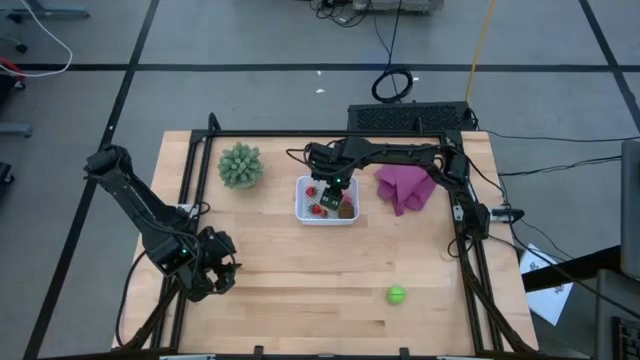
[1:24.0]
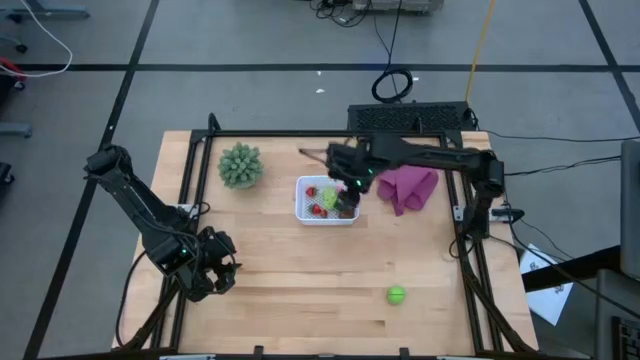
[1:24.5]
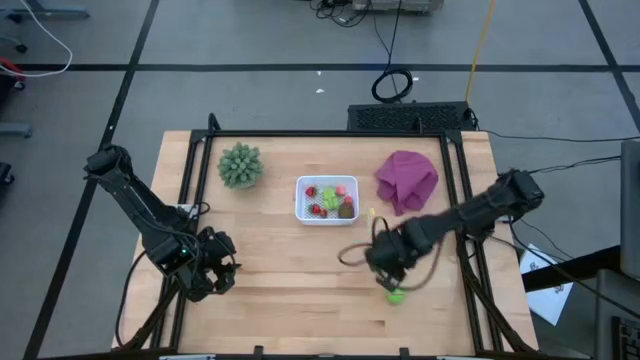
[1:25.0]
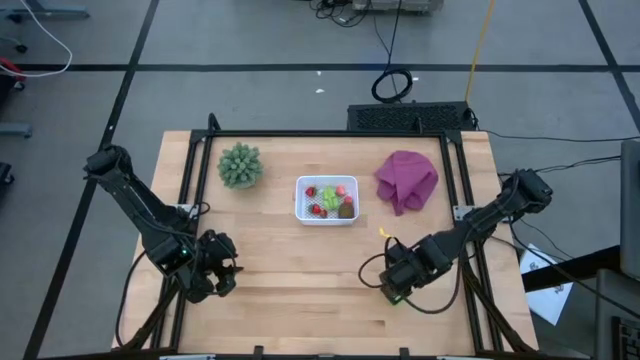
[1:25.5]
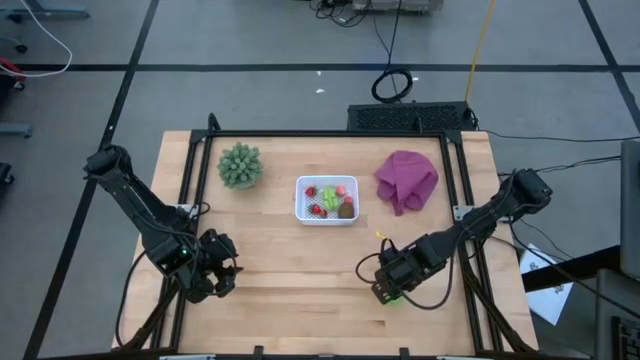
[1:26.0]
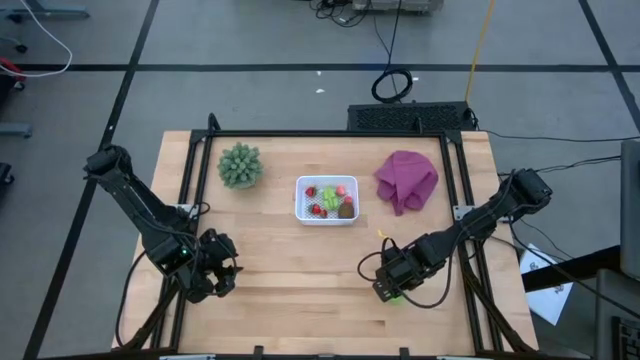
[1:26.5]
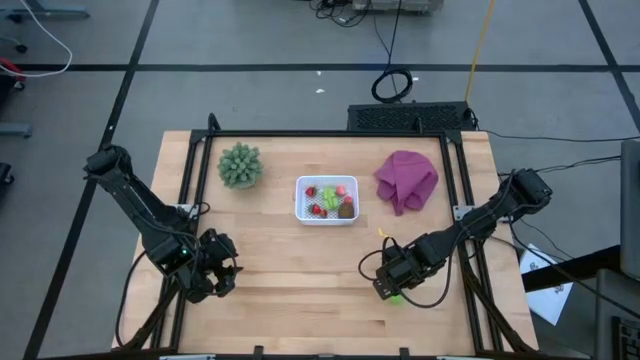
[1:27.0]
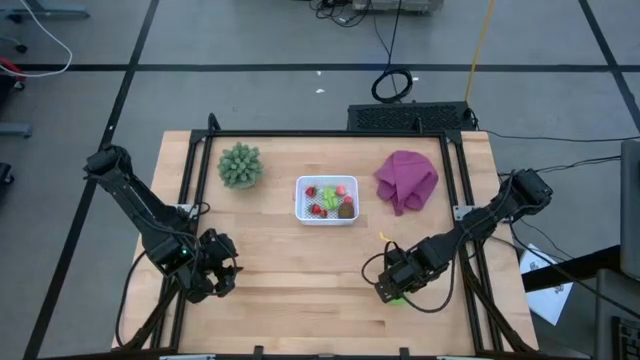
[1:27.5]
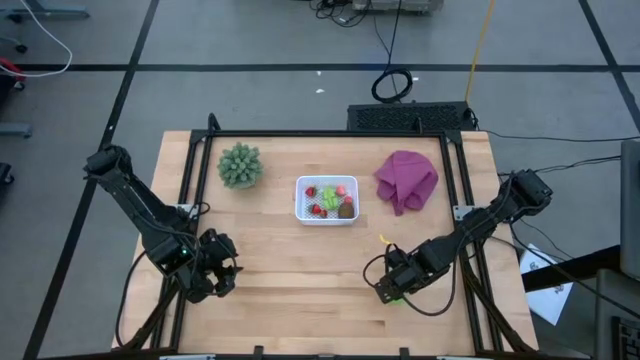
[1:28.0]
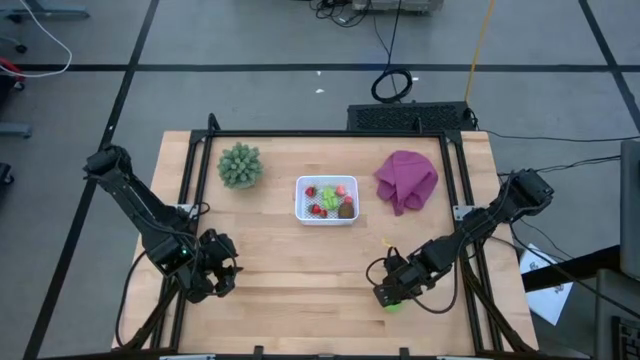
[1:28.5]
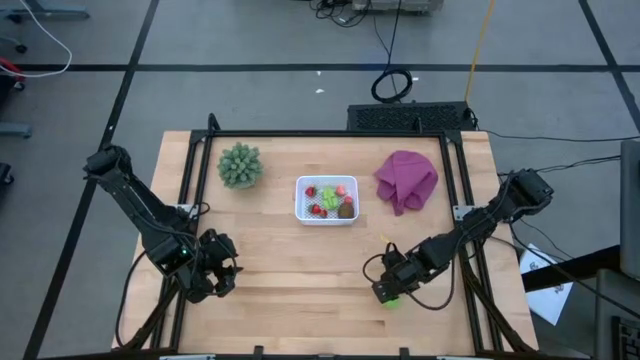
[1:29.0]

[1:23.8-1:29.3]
Task: Pick and placing Produce into tupperware
Put the green cabbage into the white bin

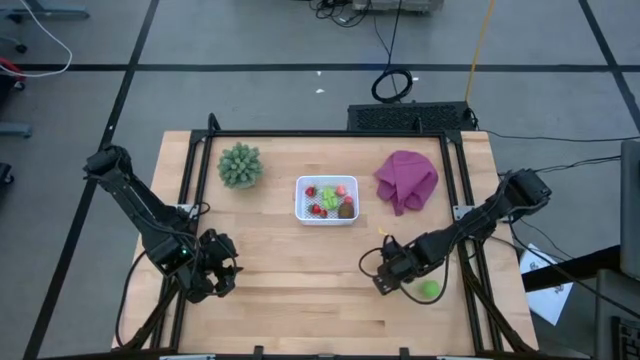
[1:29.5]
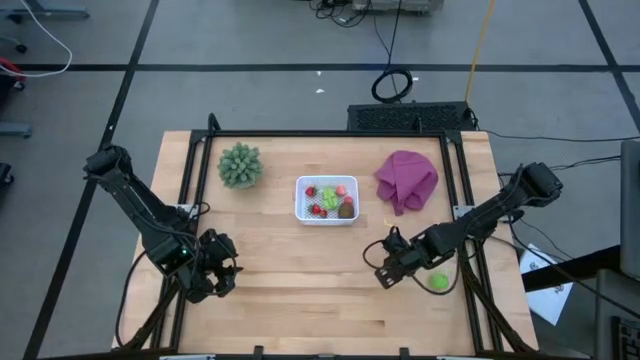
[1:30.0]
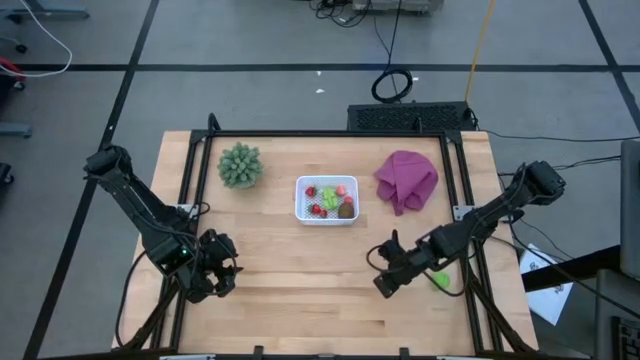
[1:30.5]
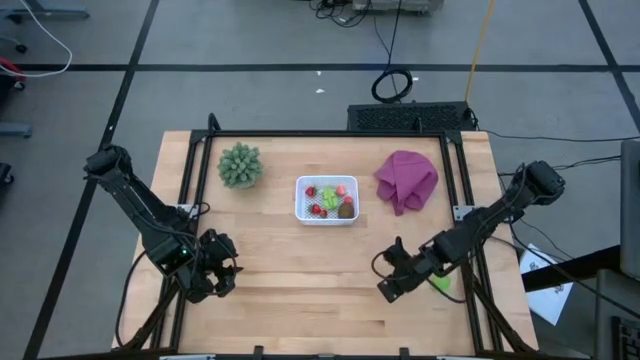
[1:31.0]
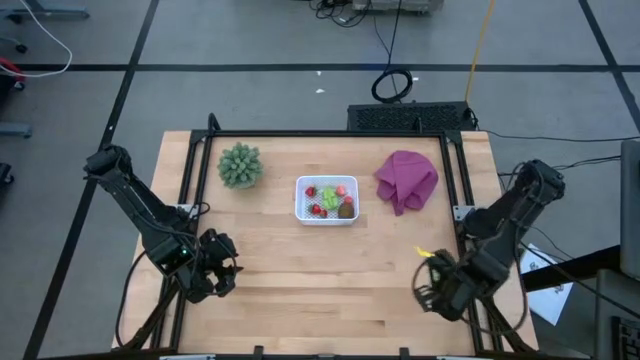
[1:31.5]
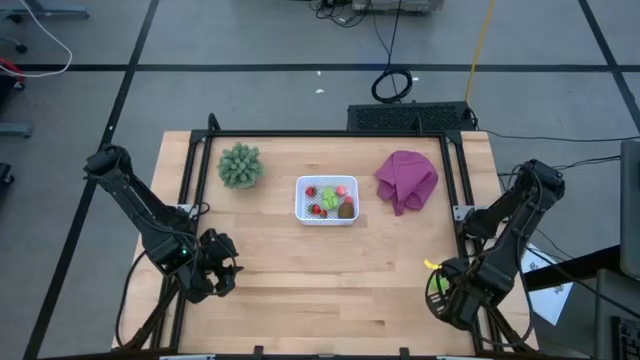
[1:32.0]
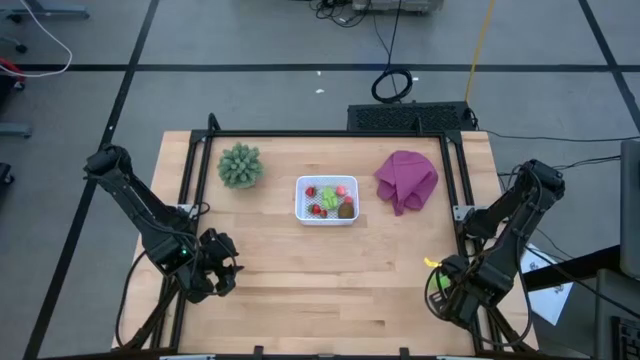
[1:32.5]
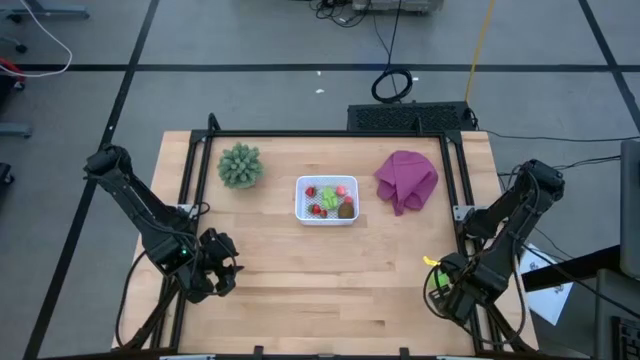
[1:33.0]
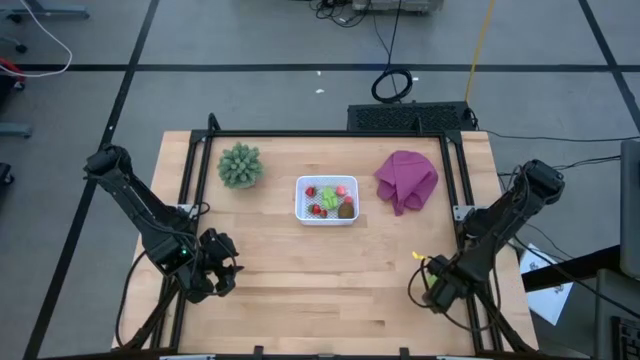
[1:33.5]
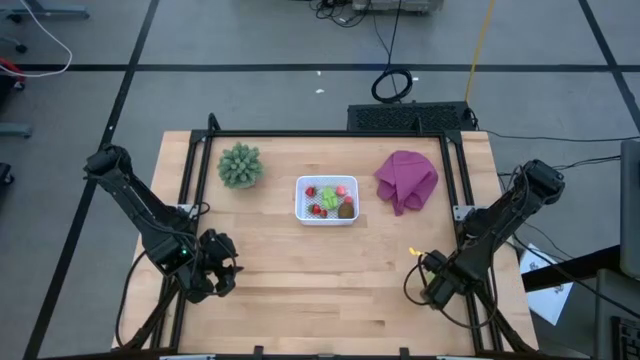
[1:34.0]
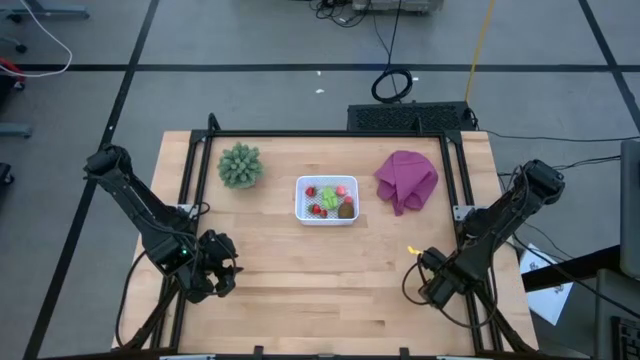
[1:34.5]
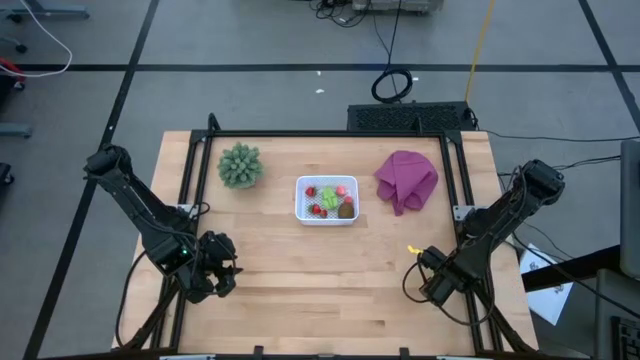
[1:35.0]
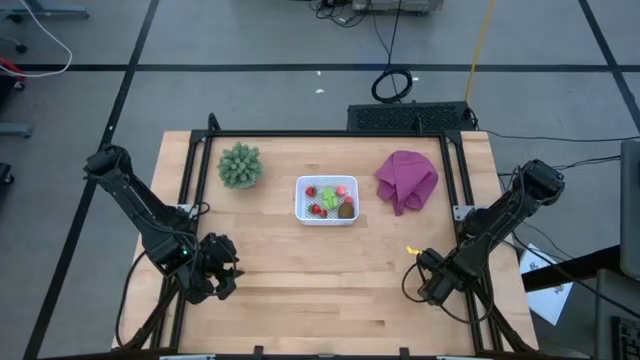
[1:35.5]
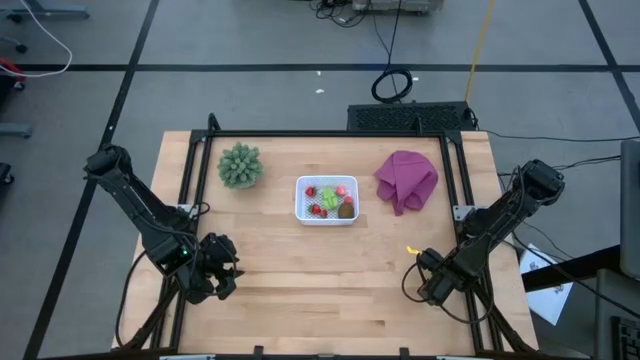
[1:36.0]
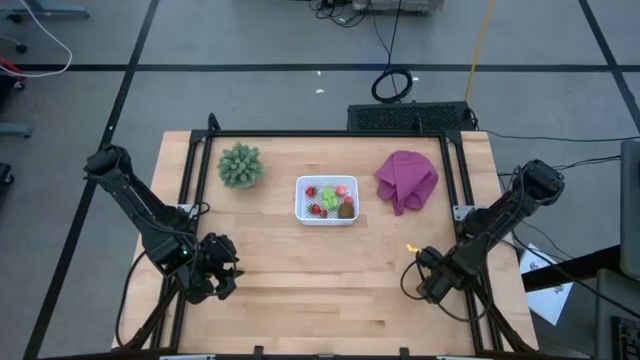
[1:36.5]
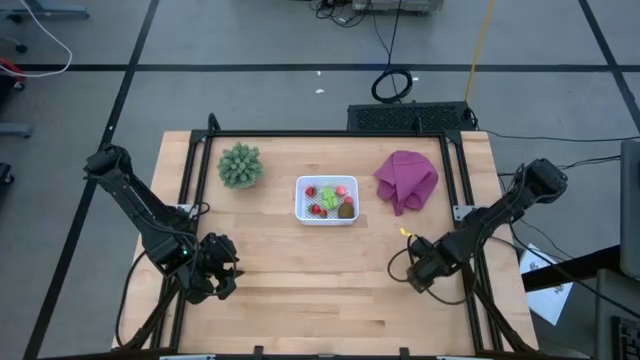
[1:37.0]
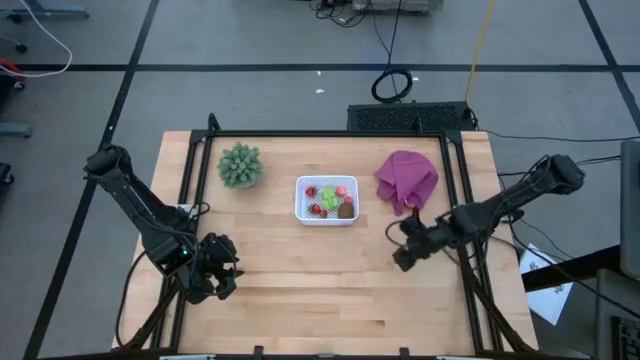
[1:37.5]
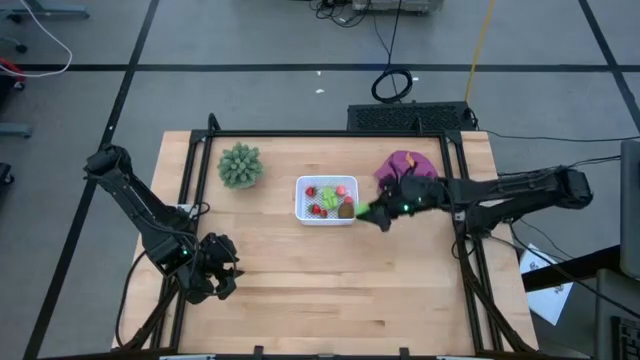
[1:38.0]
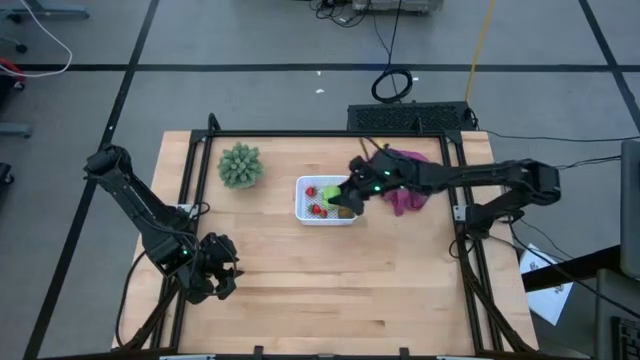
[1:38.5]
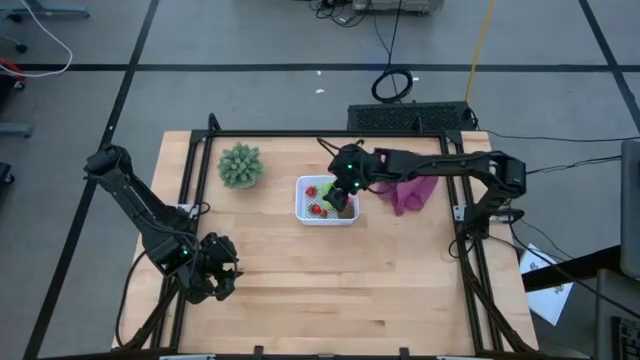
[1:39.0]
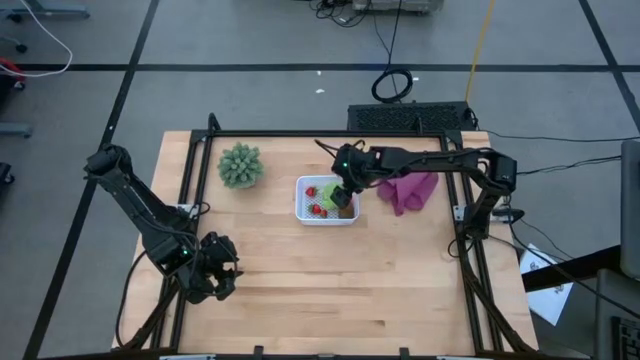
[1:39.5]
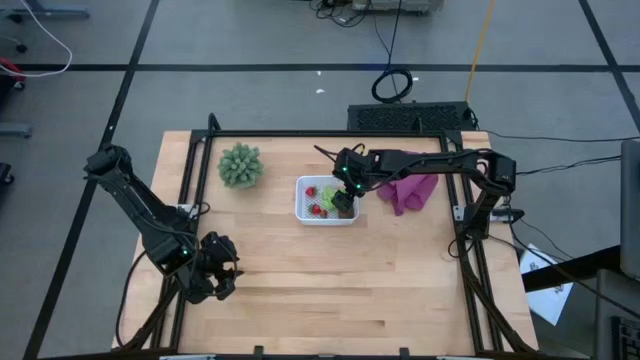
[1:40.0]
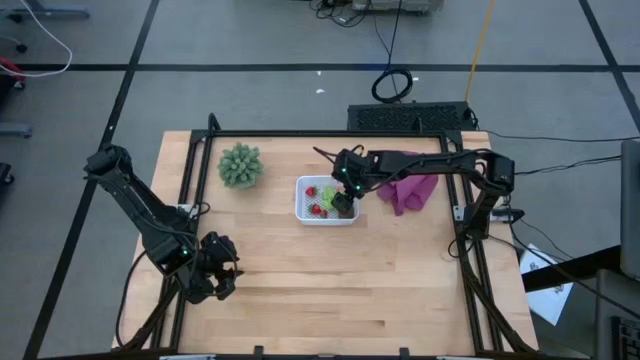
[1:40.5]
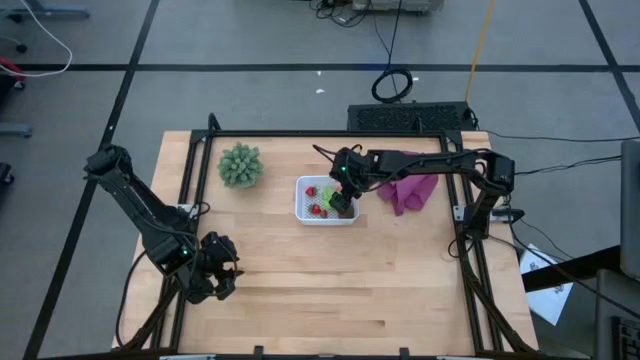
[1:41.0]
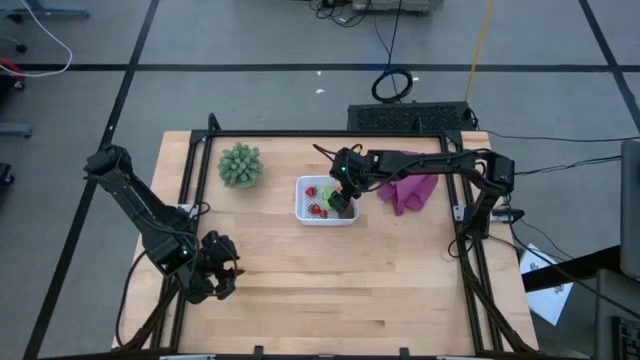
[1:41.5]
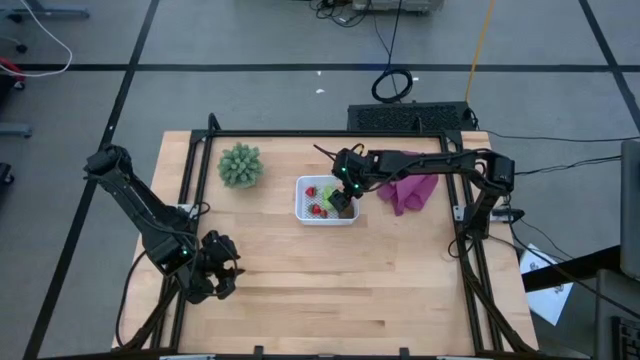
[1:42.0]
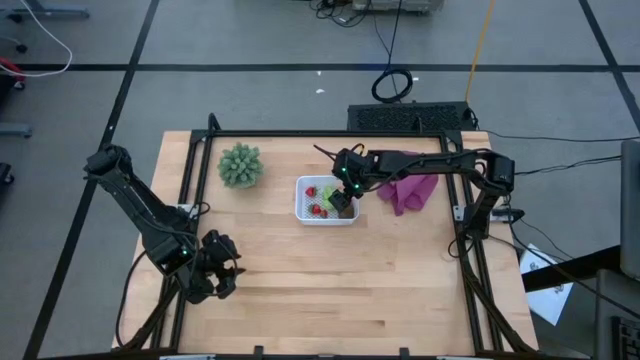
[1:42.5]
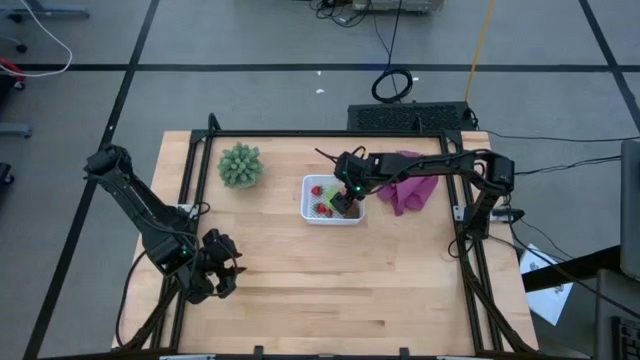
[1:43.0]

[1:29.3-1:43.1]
Put the green cabbage into the white bin

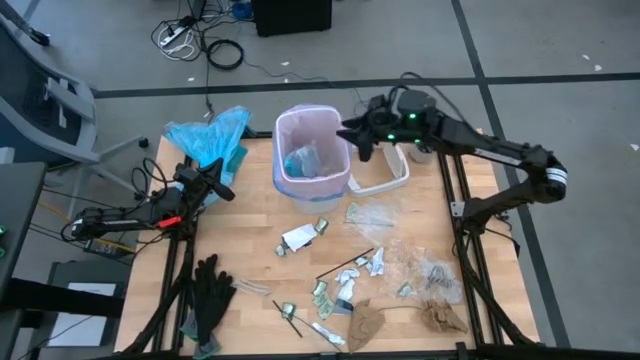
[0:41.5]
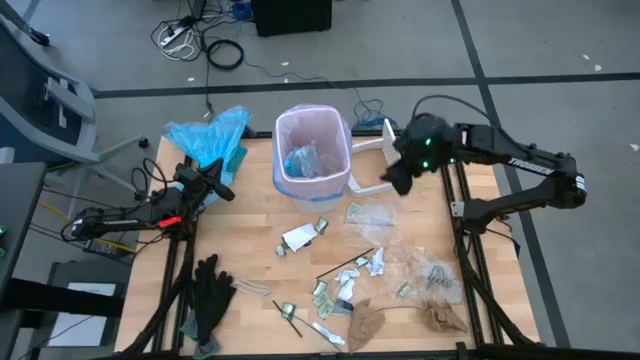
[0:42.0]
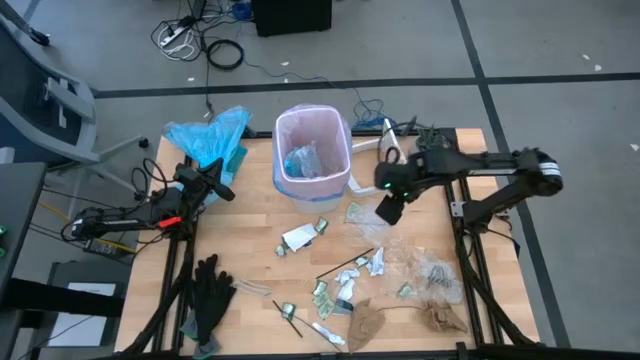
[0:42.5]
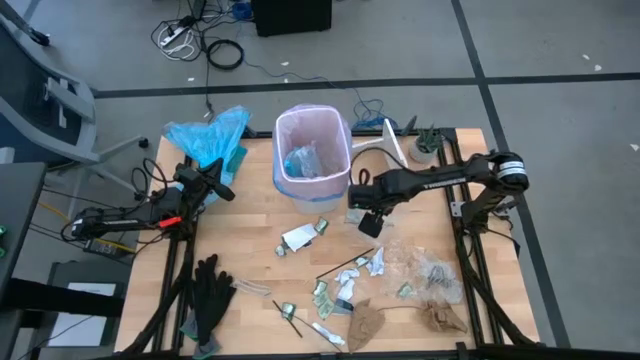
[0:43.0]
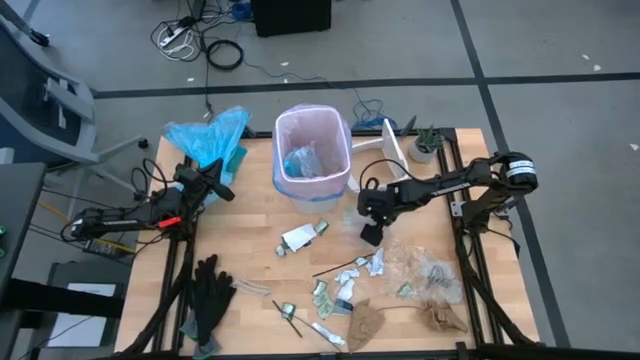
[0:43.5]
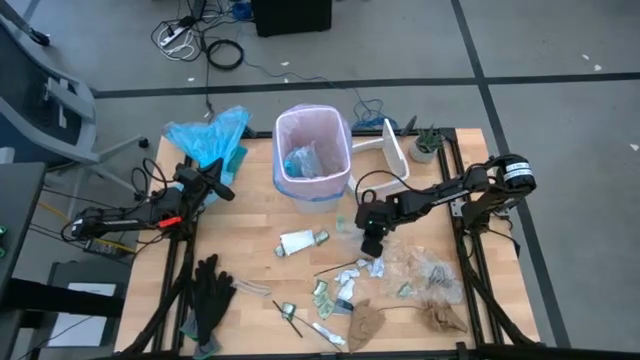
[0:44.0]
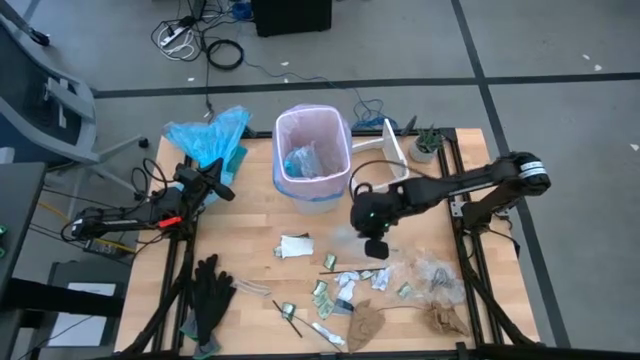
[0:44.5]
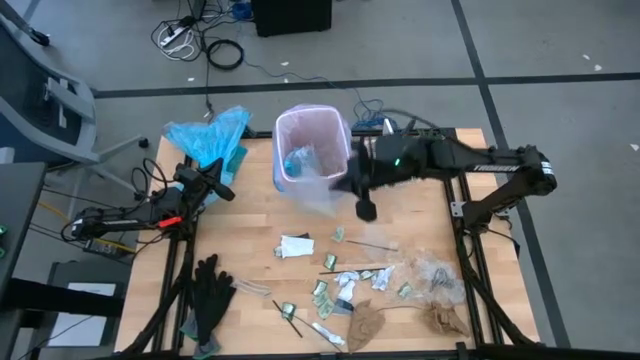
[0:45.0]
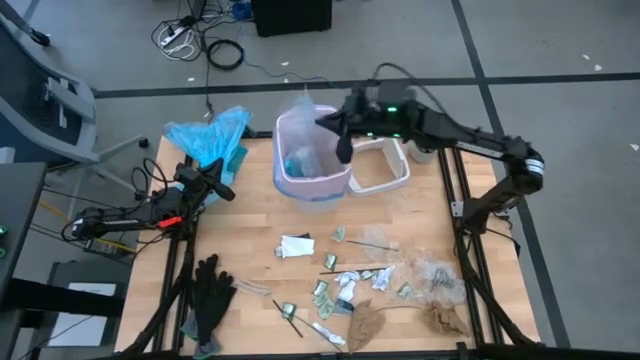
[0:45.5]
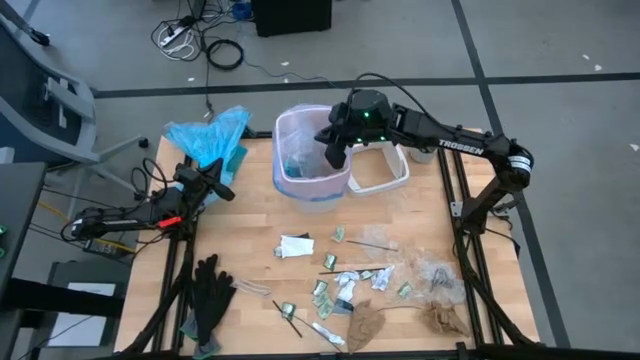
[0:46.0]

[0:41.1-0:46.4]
Task: place trash/remove bag and relplace
Put the clear cellophane into the trash bin
